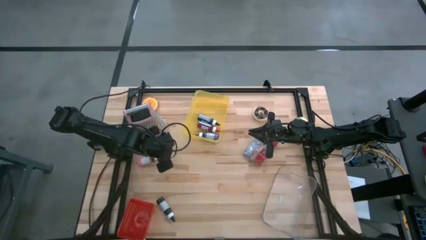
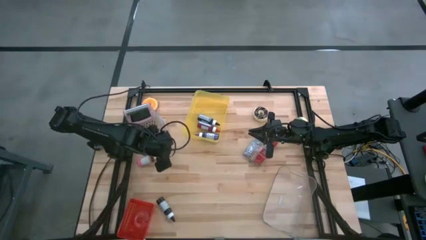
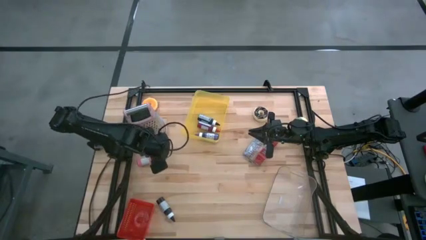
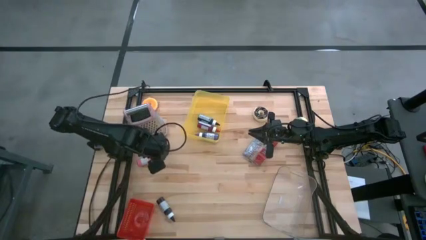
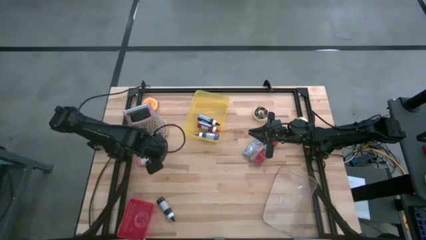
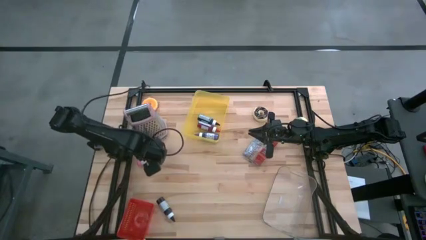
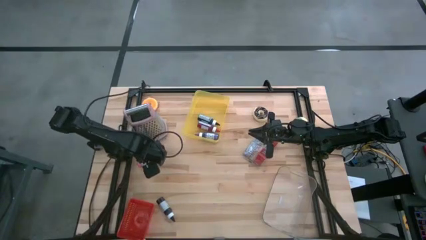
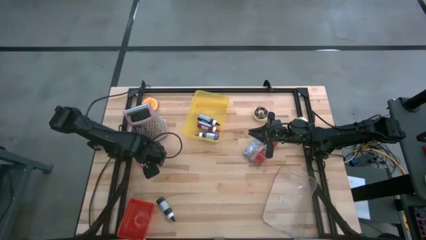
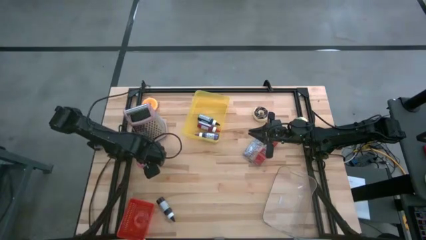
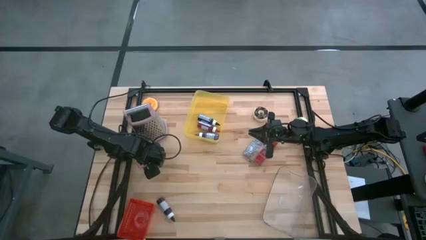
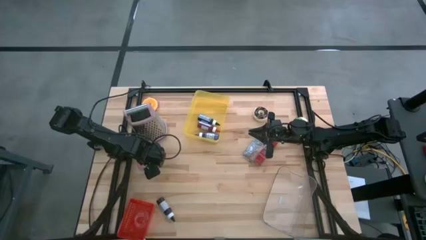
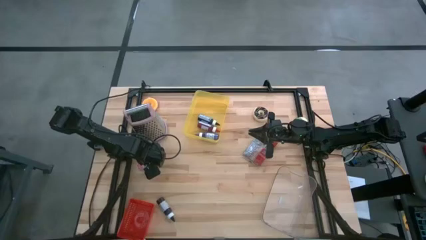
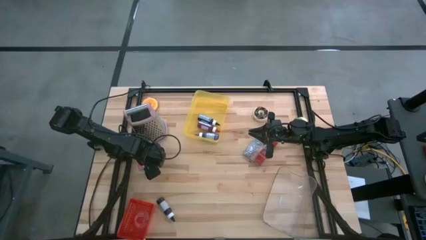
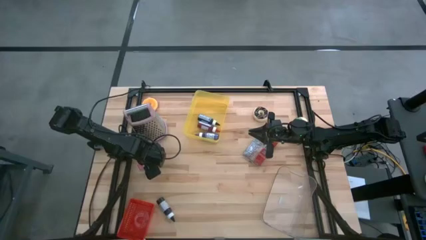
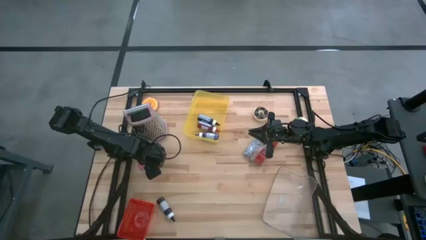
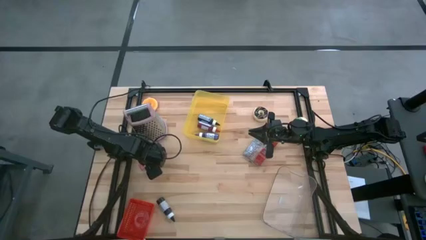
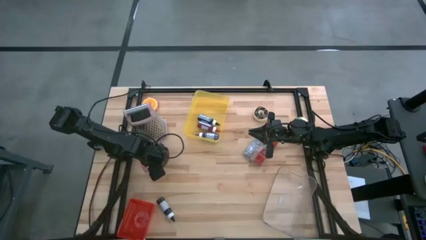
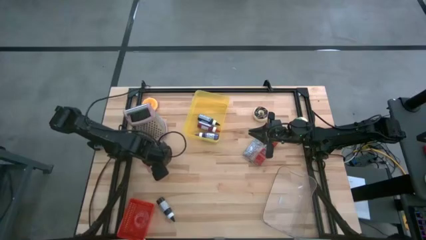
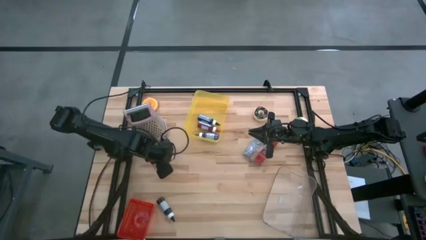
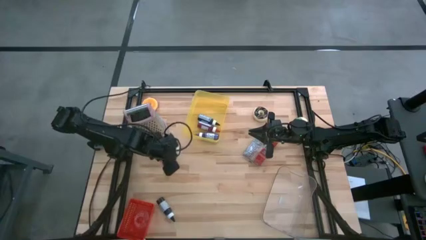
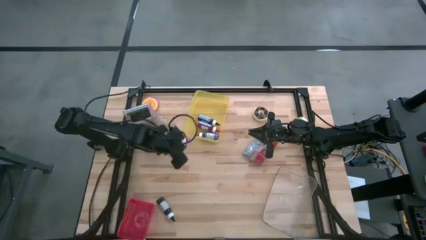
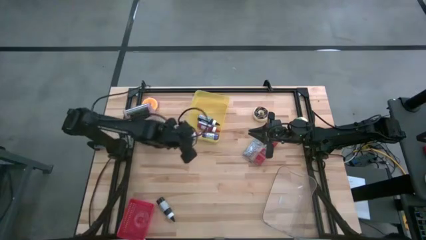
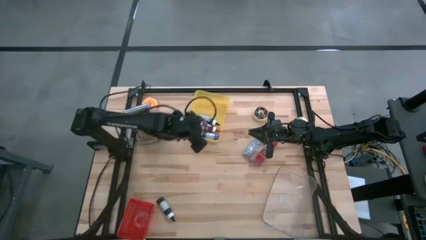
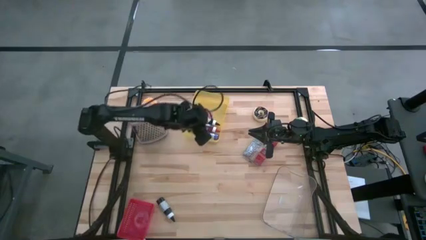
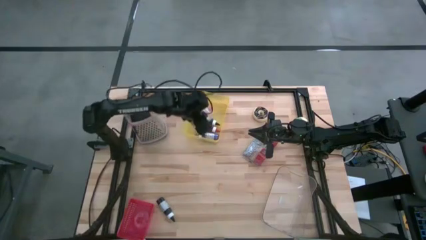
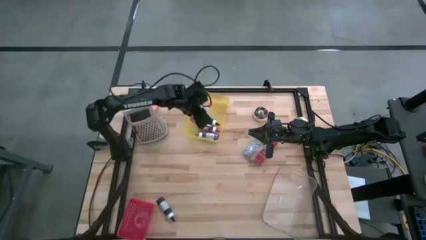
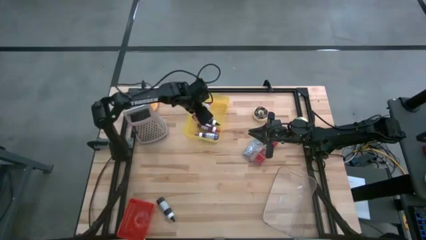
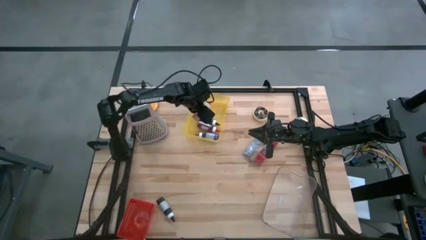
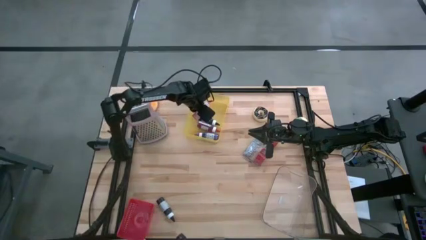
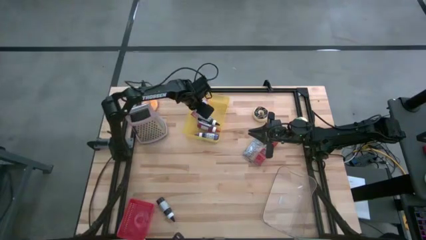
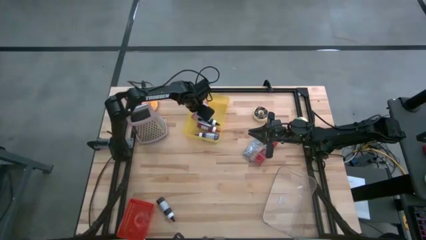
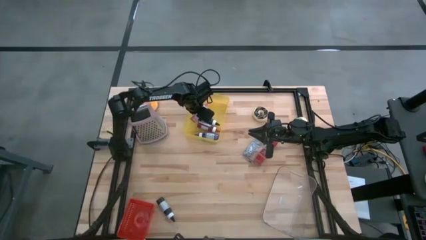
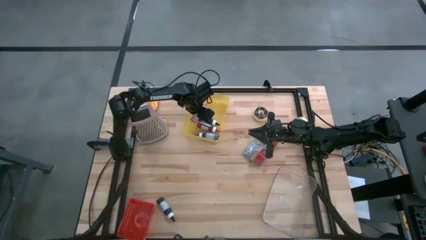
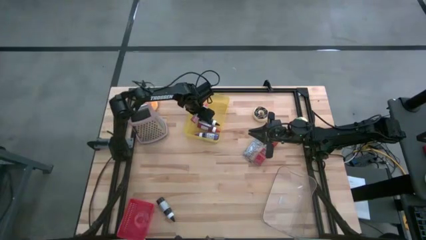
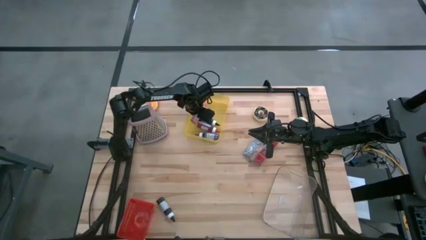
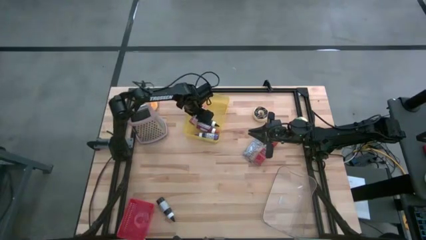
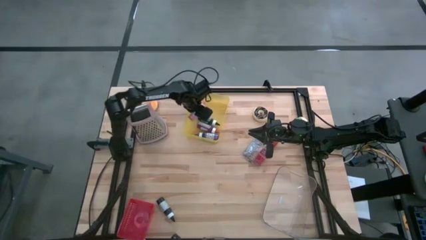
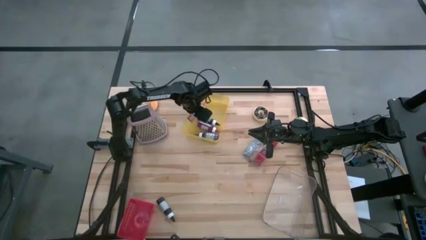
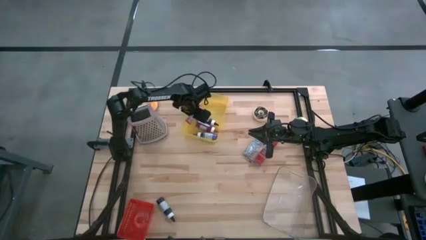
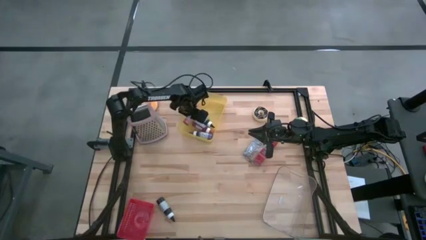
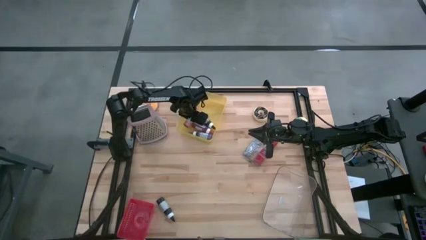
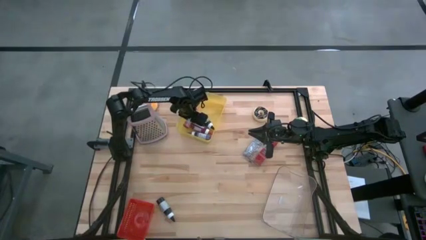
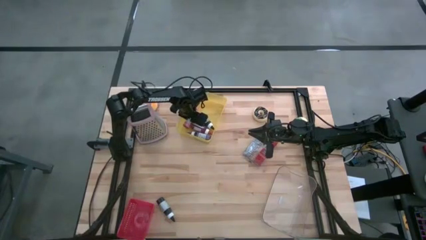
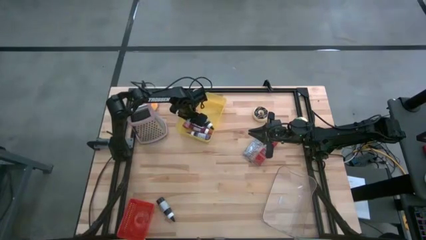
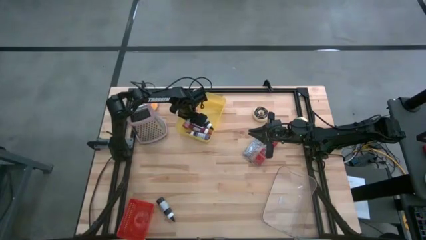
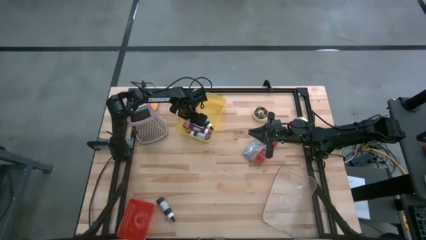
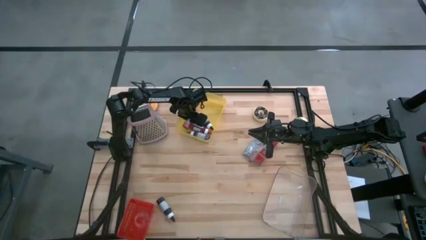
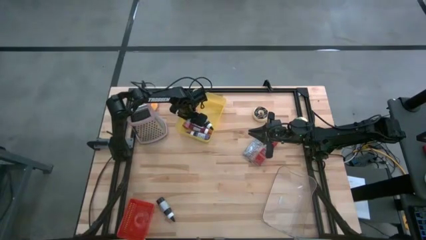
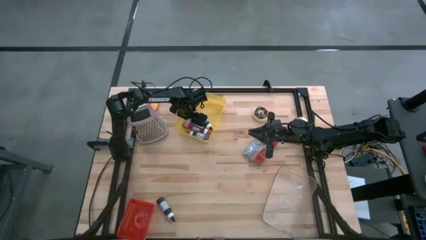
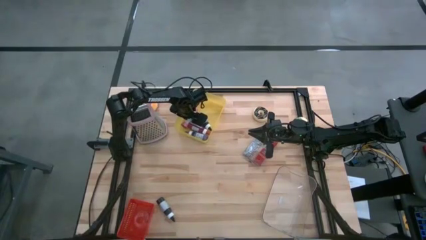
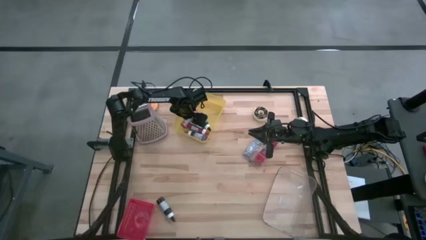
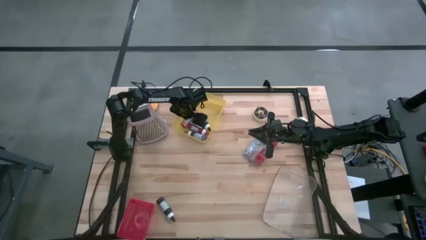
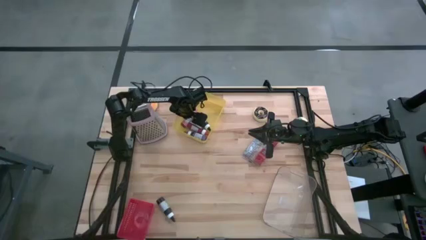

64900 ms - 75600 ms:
Task: Pick & Place Food Item
Put the pink food coloring into the yellow bin

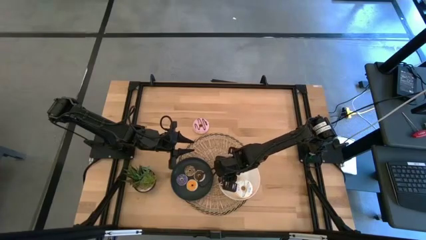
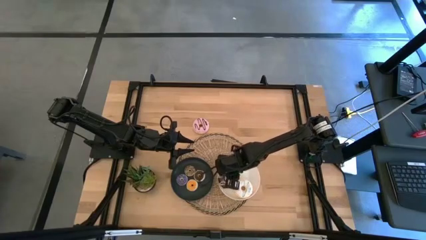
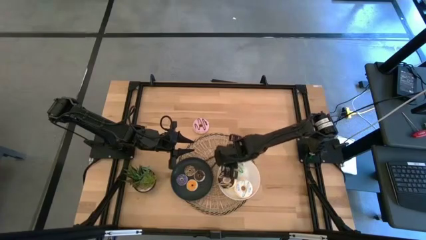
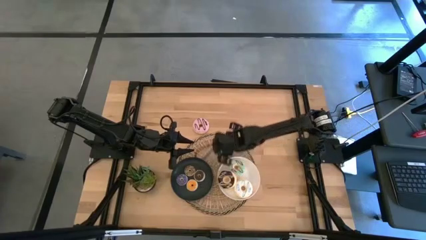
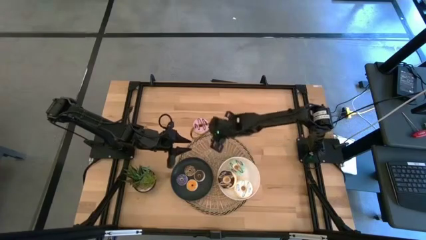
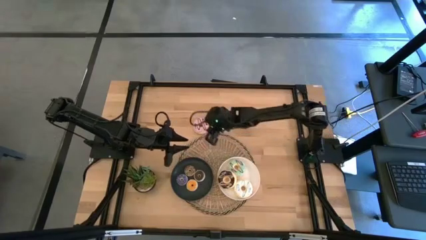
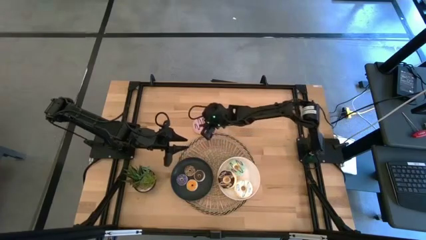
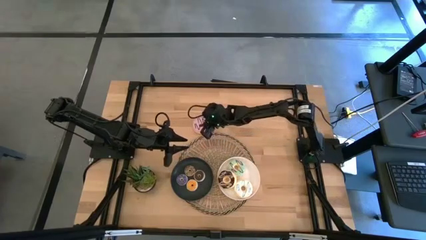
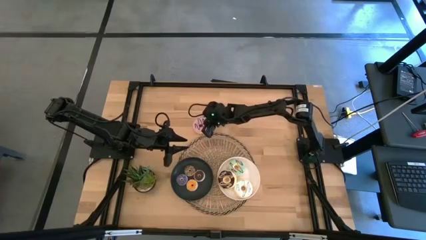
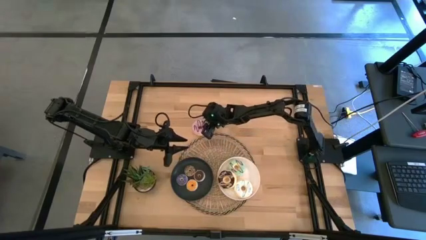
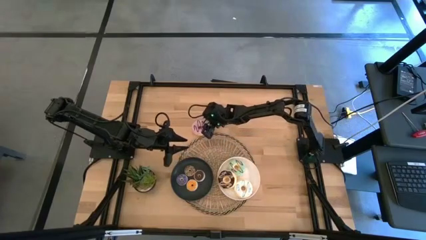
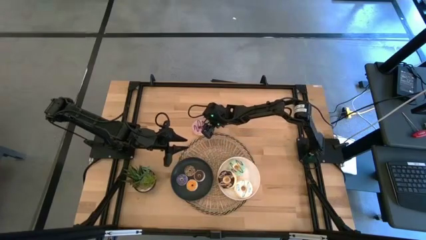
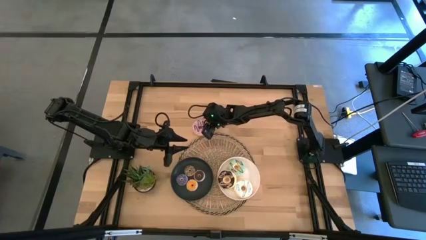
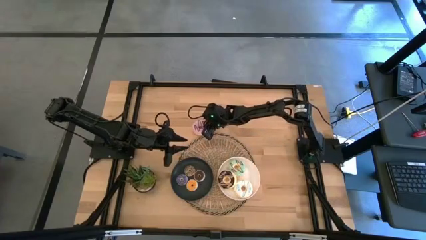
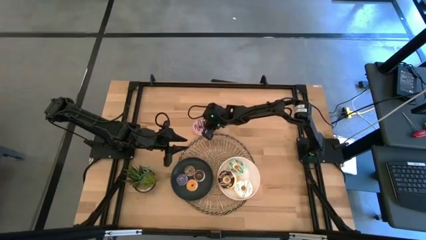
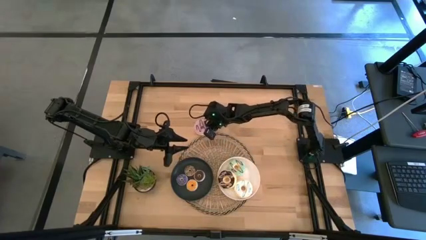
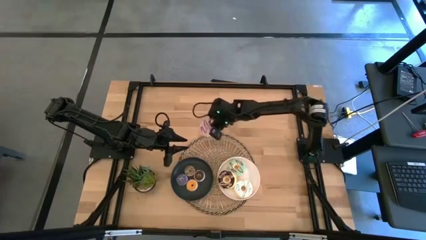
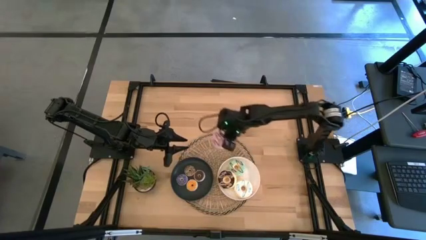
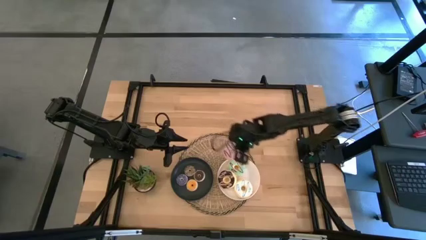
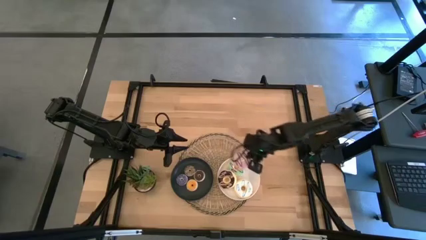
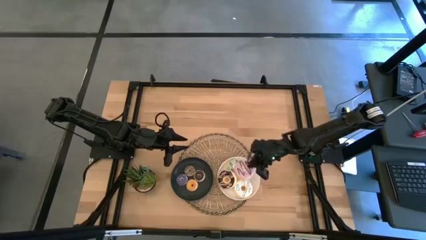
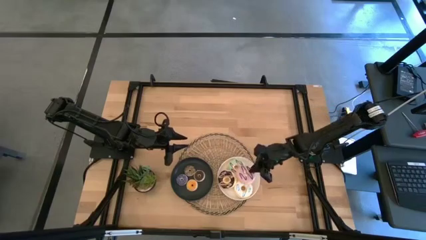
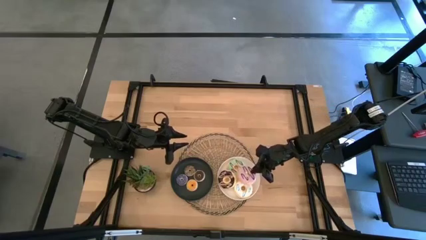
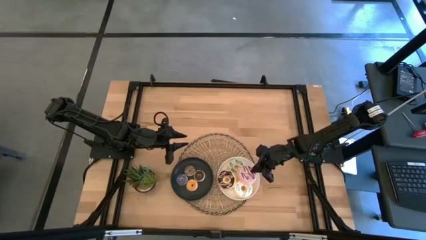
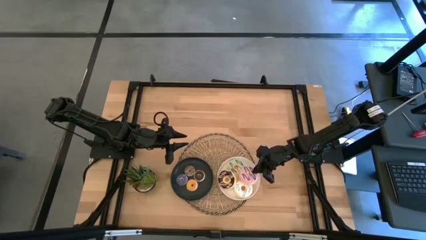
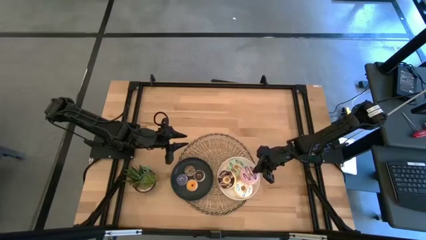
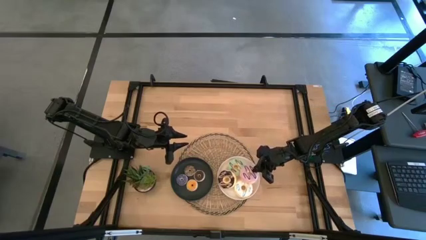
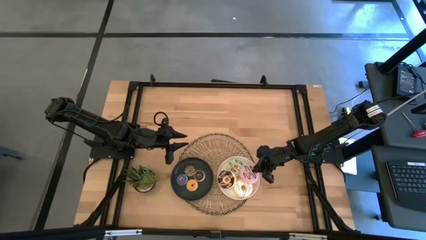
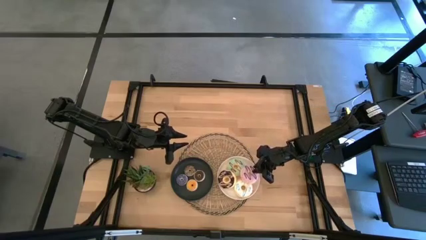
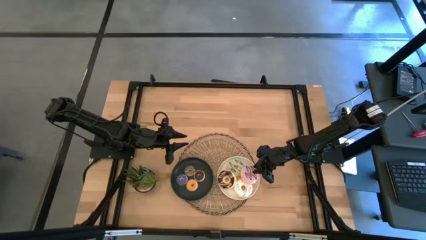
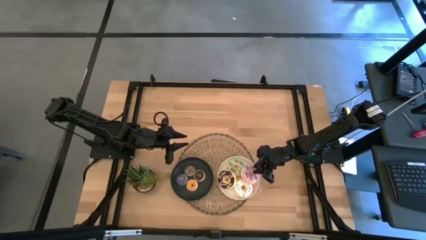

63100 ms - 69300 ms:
Task: Pick & Place donuts
Put the large purple donut on the white plate
